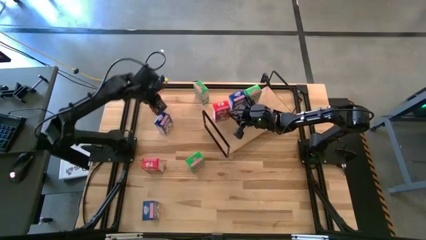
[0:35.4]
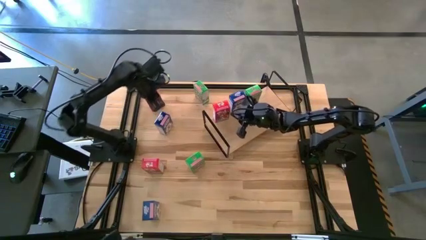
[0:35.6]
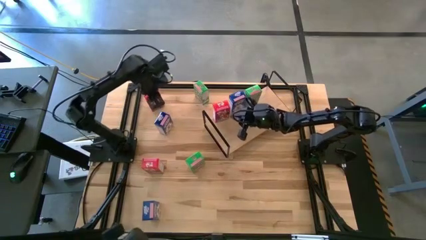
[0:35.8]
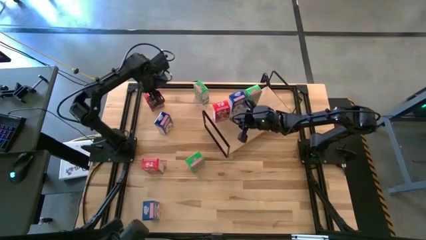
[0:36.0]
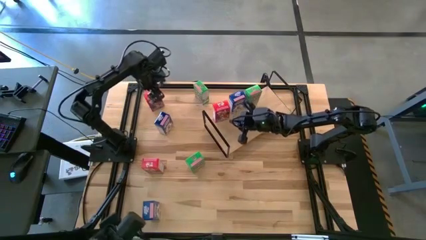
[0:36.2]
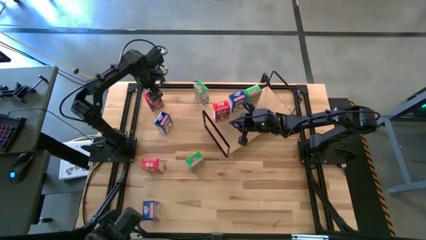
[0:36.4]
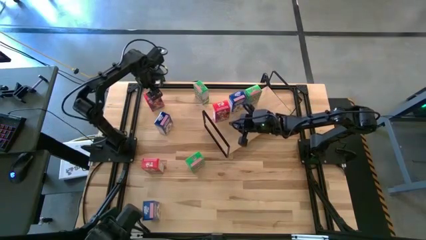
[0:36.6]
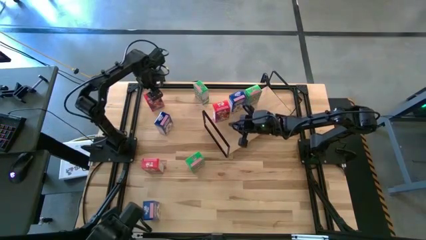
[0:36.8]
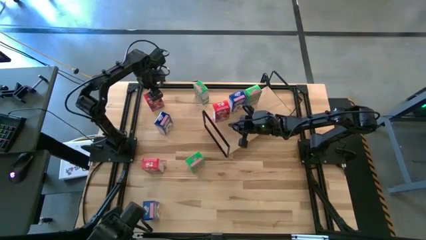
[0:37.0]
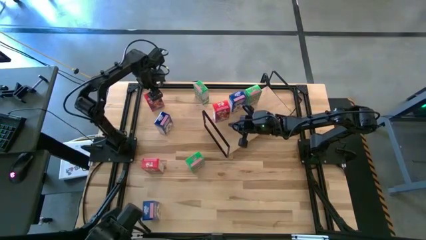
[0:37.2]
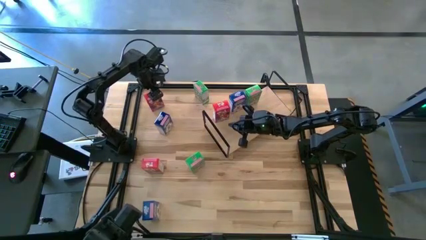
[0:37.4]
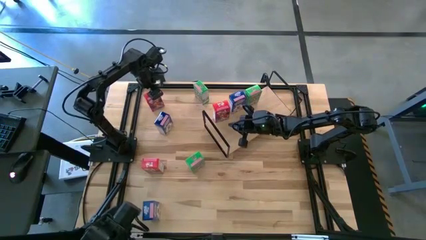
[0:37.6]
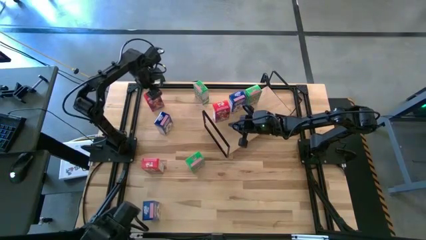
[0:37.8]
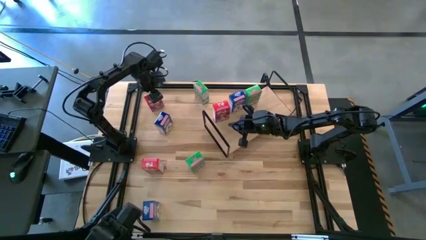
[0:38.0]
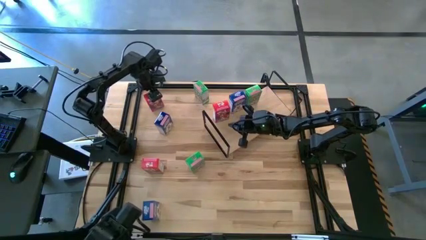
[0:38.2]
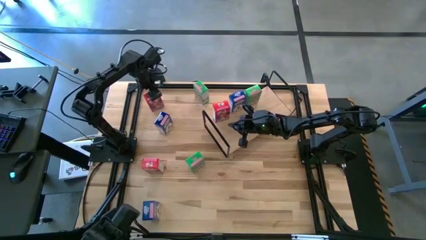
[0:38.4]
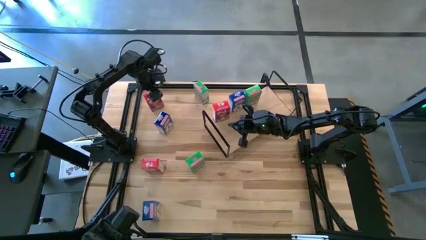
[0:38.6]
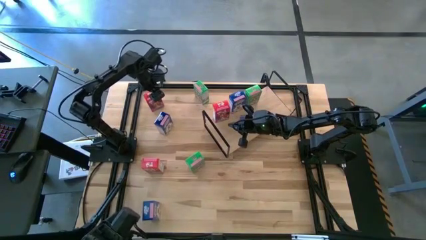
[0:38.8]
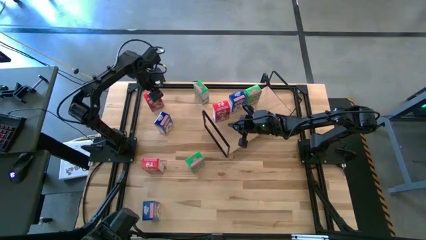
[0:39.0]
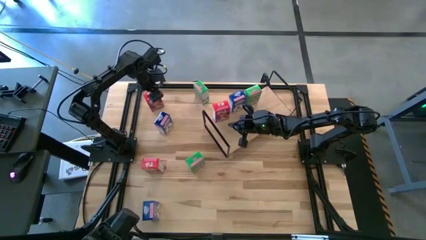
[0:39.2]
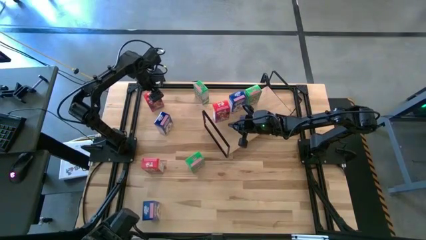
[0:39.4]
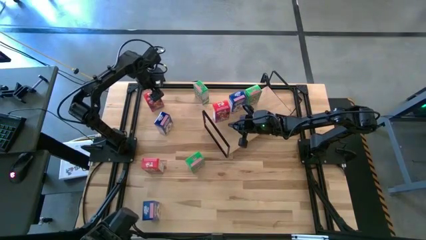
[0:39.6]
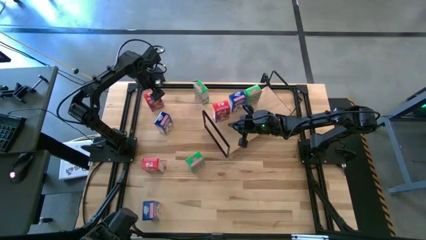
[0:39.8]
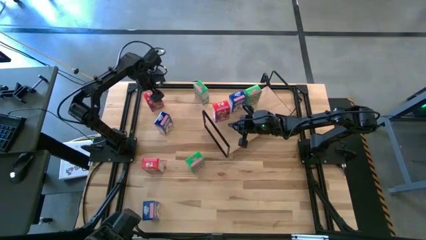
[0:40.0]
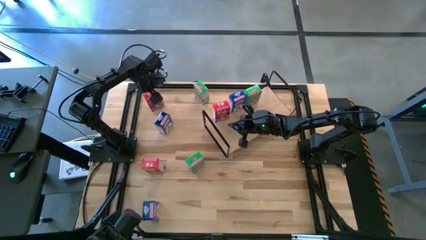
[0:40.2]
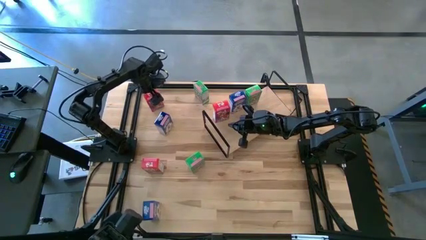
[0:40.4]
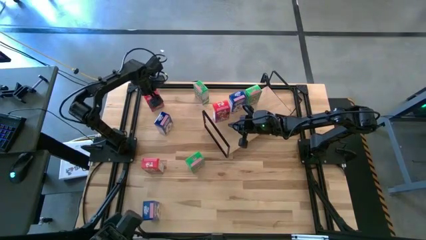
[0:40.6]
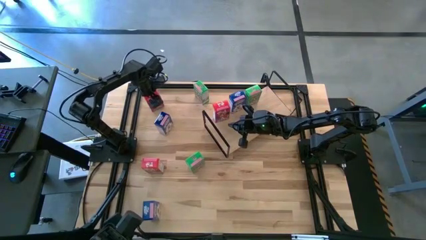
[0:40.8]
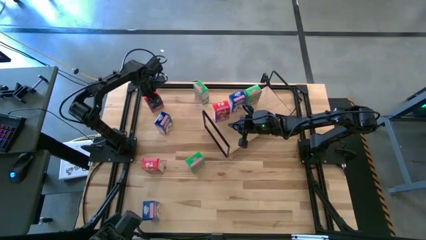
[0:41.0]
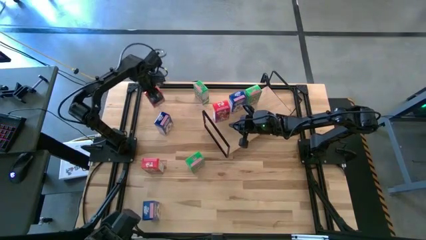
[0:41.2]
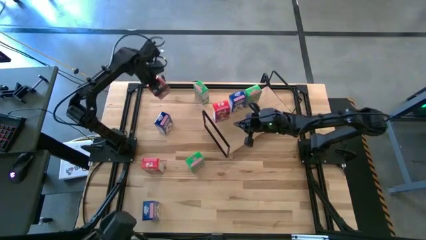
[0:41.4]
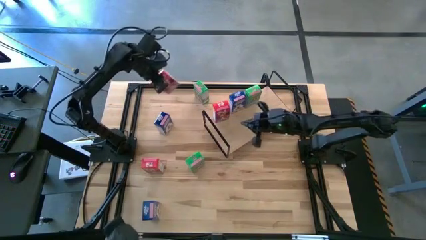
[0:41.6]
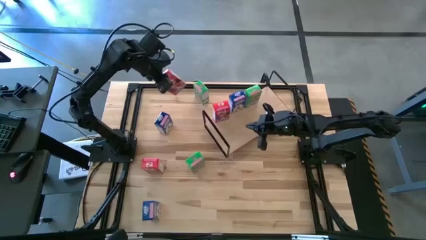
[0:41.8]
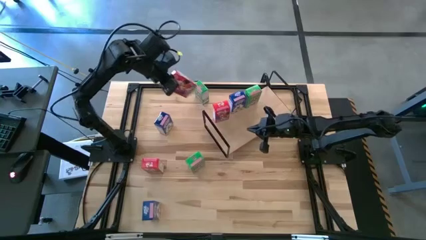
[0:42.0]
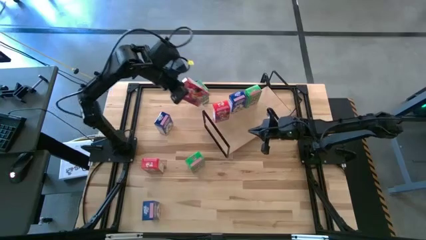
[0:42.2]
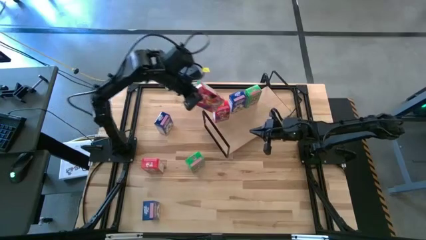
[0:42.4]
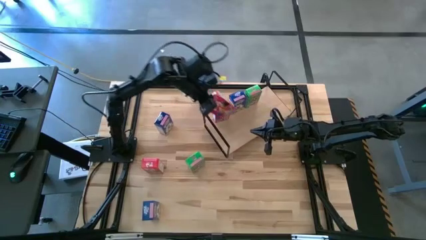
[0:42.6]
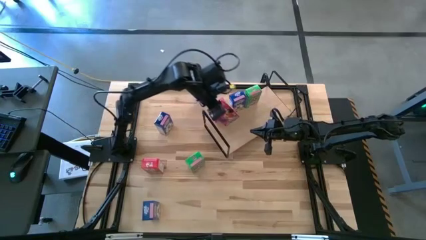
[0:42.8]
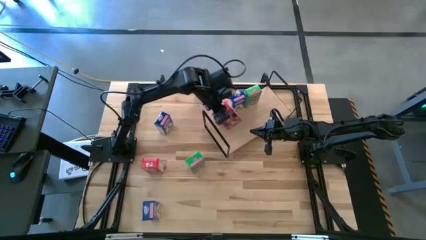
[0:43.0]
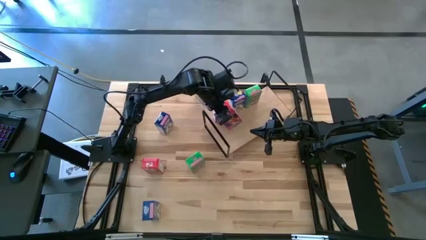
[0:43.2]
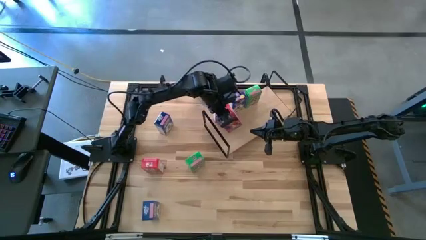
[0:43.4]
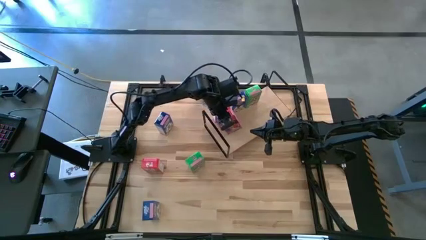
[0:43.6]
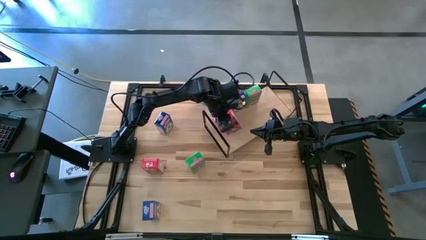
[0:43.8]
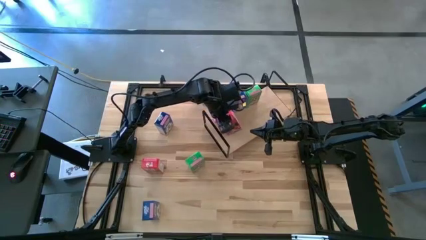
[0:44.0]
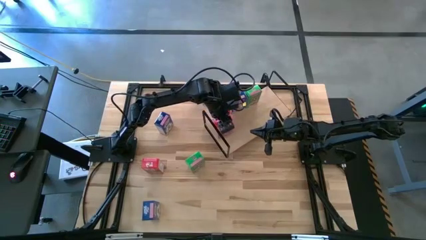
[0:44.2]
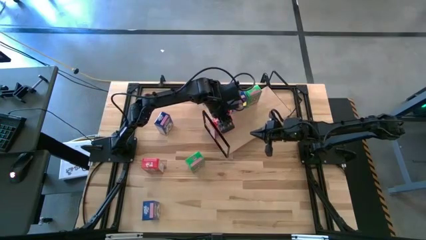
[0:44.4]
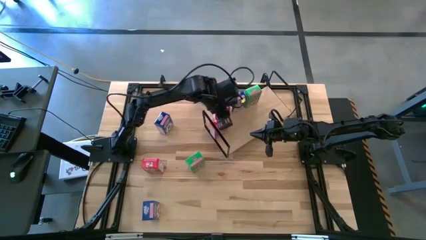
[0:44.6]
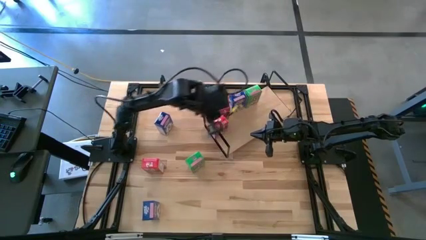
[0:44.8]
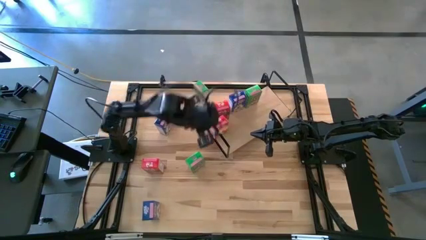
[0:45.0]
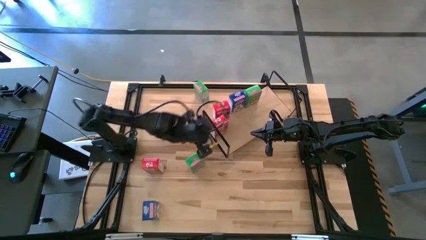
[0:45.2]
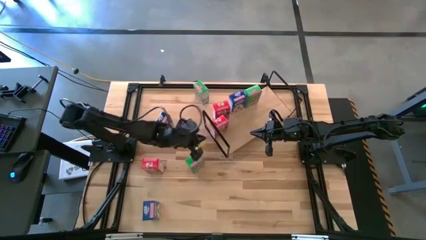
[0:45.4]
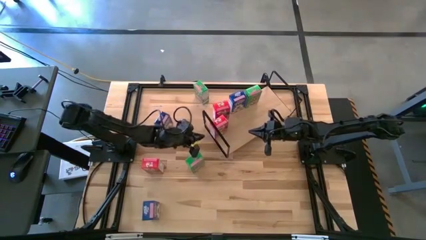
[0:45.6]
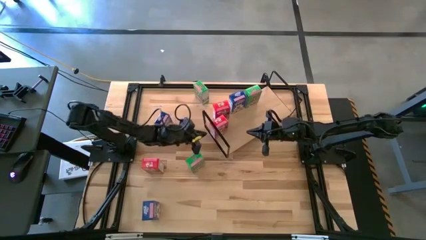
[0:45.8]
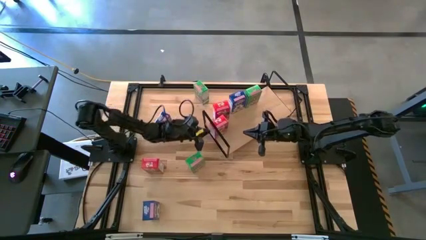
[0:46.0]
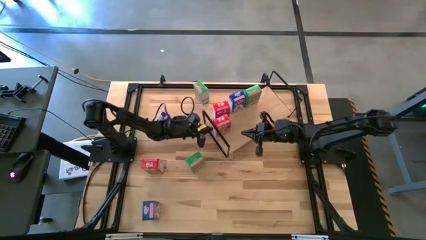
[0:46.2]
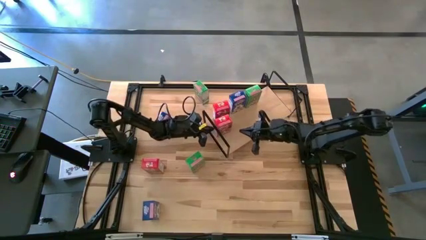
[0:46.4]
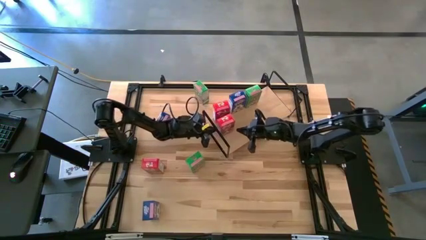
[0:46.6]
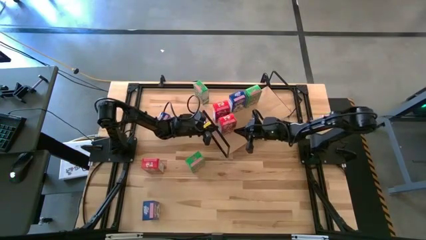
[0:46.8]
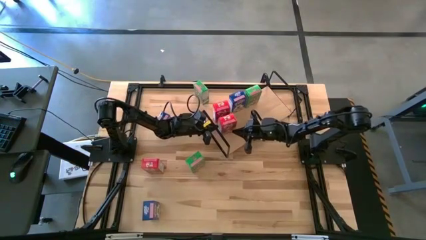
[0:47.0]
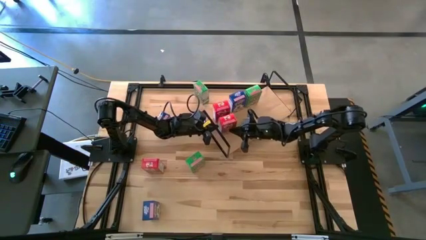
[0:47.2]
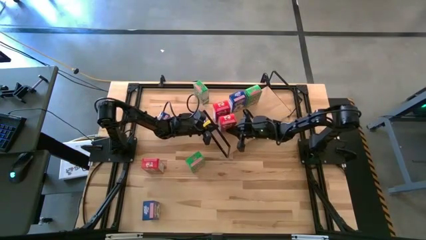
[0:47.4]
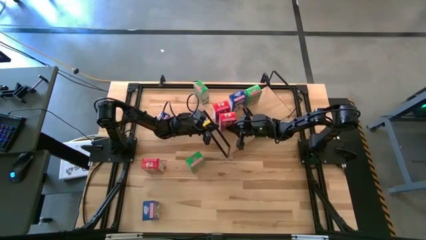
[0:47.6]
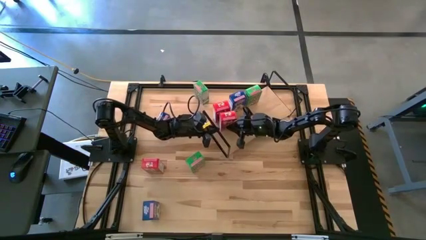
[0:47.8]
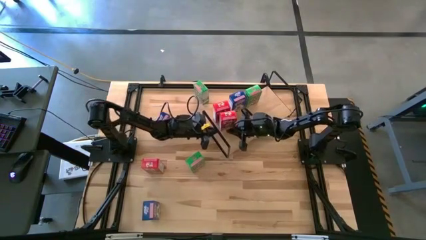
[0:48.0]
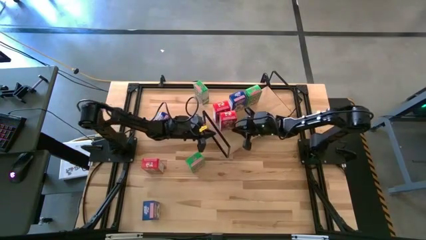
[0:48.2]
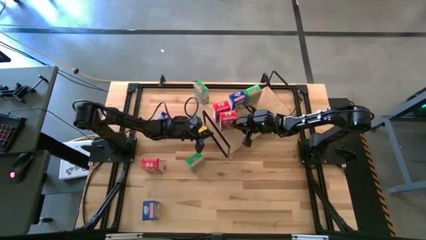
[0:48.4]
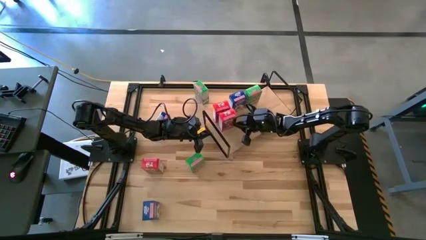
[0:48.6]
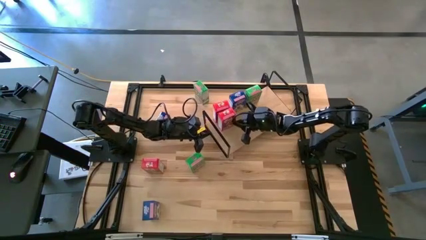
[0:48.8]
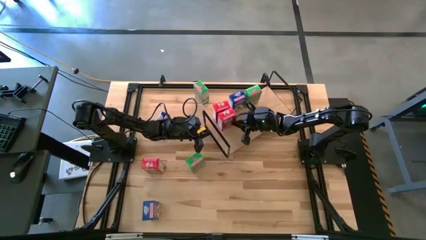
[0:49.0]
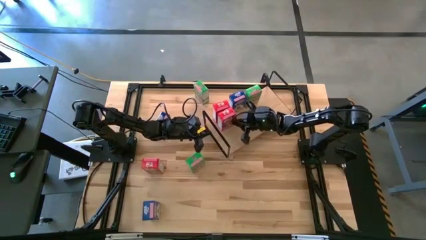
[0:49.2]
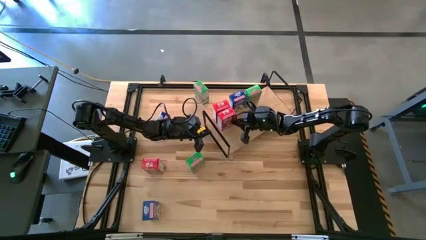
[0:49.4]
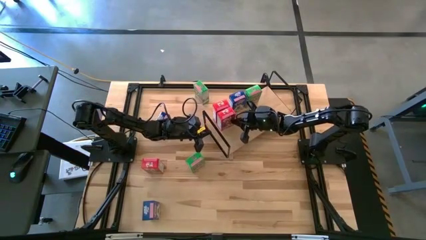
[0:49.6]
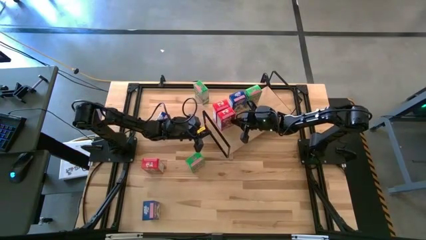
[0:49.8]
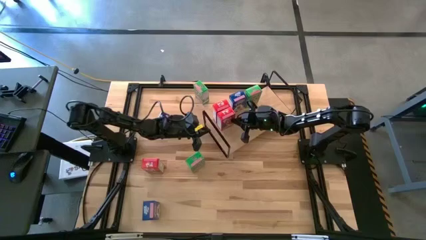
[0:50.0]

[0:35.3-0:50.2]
Task: Stack cereal on shelf
Put the top red cereal box on the shelf aligned with the other red cereal box

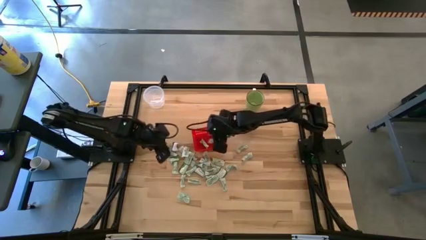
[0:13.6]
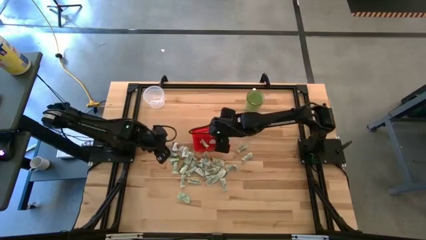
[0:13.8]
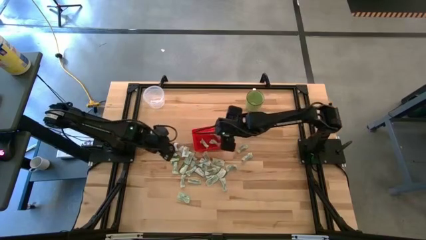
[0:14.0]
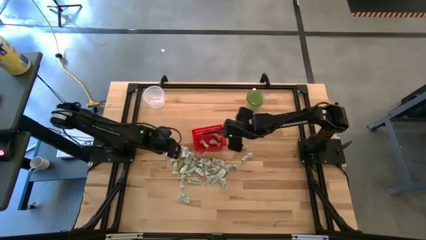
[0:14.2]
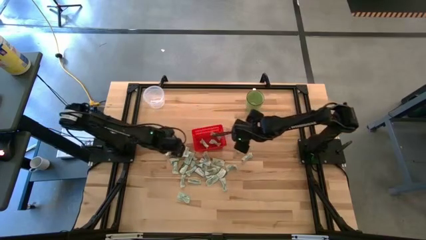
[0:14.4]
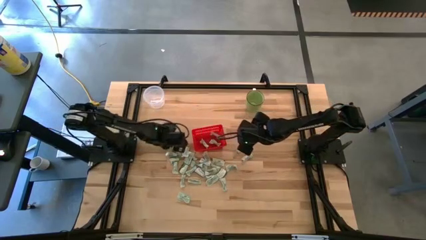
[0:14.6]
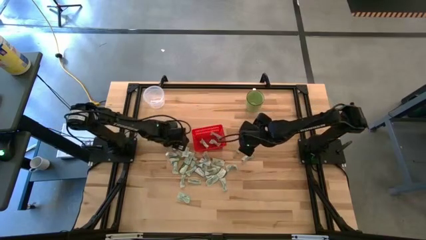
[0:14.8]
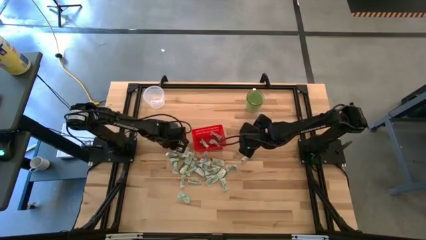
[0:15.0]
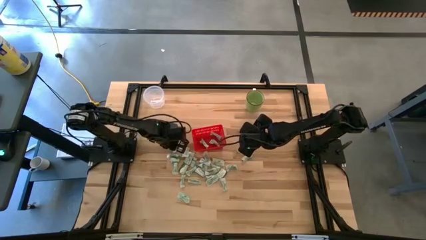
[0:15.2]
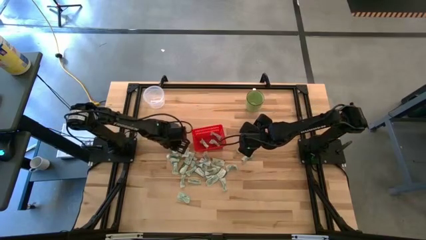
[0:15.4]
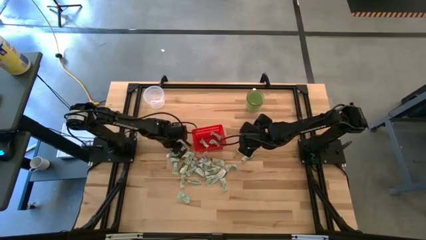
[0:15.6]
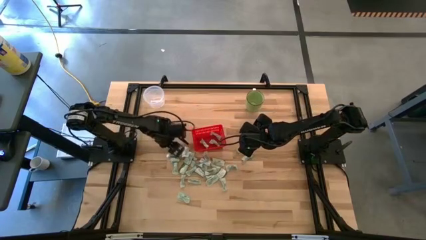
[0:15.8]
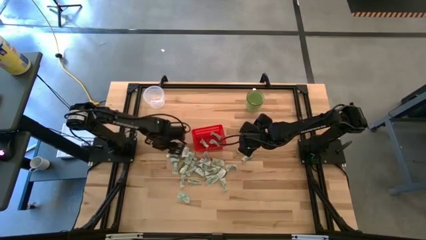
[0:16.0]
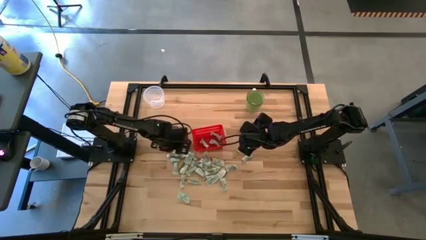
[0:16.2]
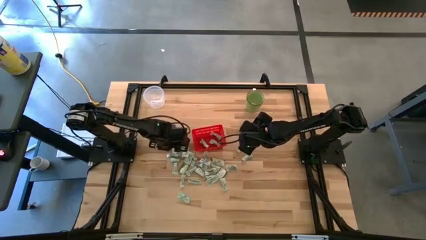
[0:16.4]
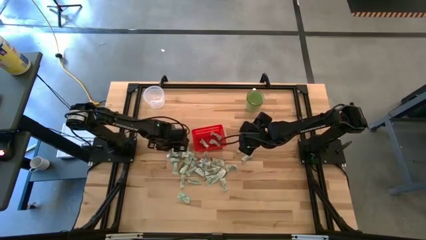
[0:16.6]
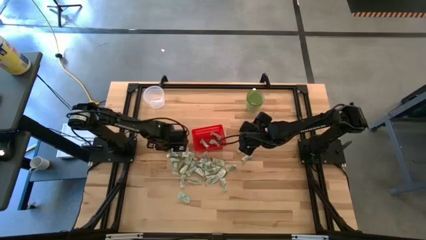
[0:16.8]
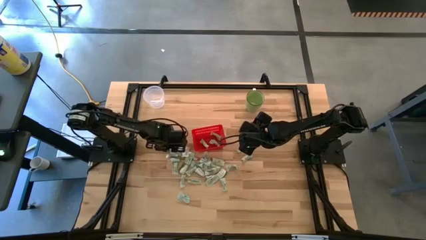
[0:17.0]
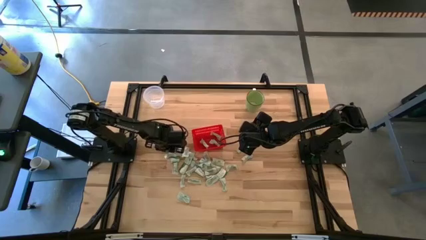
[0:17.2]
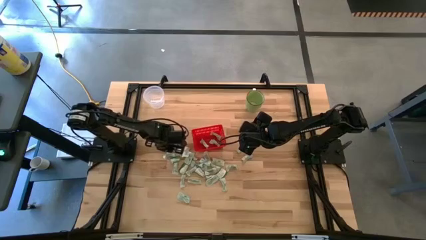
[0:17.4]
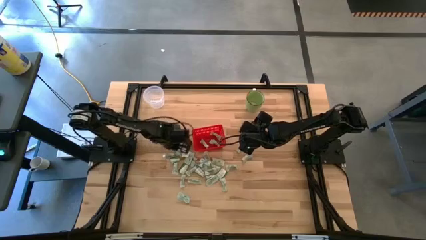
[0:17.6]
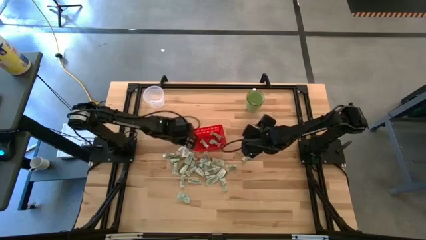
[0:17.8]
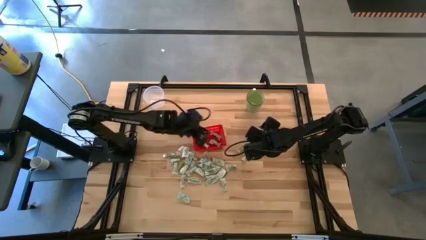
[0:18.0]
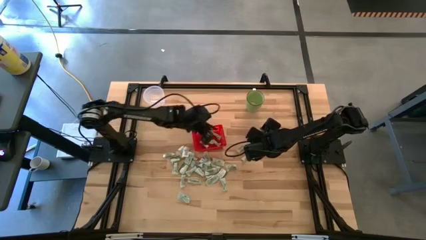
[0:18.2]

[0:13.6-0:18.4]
Task: Pick and place Stevia / Truvia into bins
Put the truvia packet into the red basket
